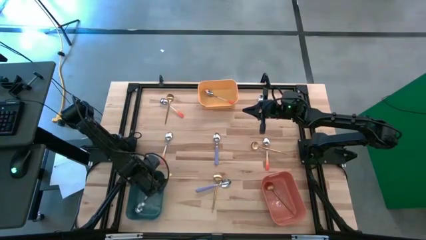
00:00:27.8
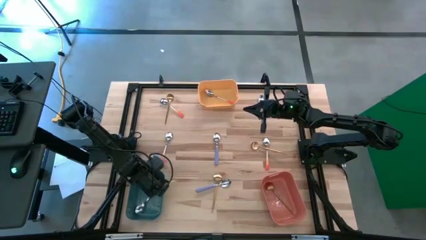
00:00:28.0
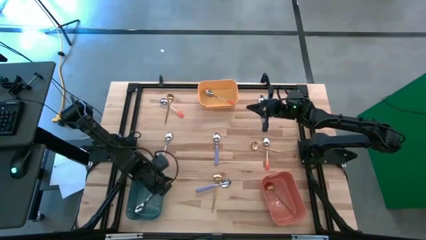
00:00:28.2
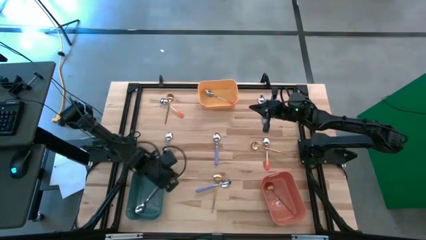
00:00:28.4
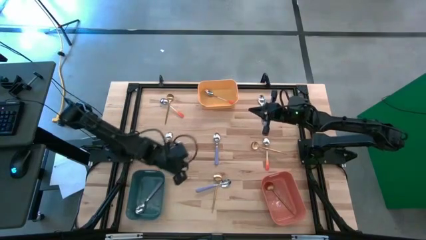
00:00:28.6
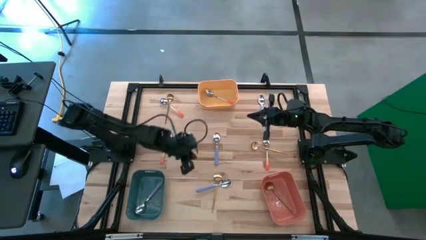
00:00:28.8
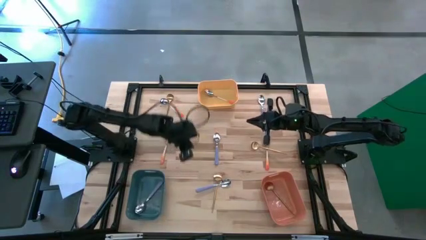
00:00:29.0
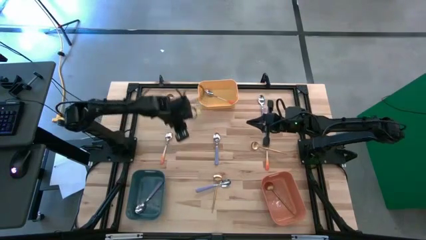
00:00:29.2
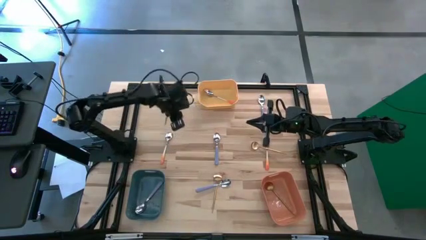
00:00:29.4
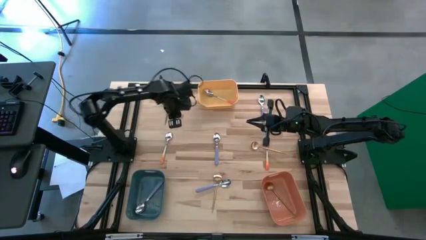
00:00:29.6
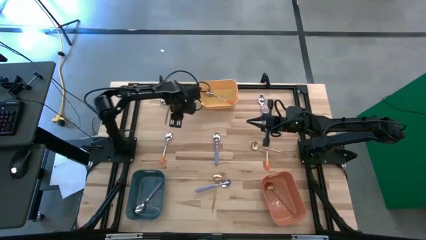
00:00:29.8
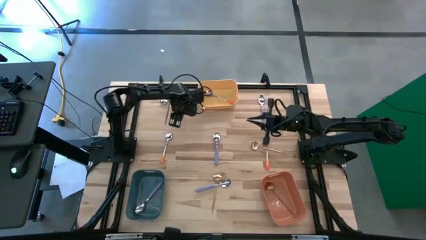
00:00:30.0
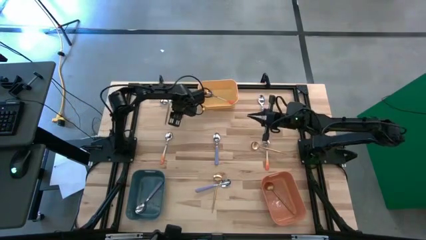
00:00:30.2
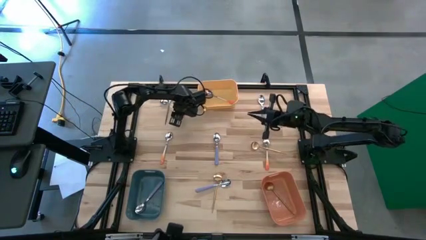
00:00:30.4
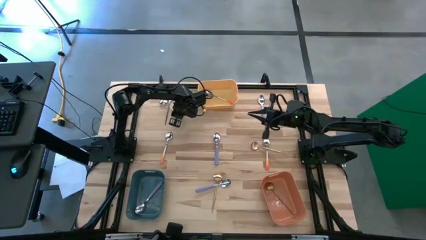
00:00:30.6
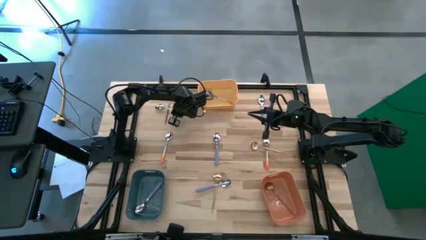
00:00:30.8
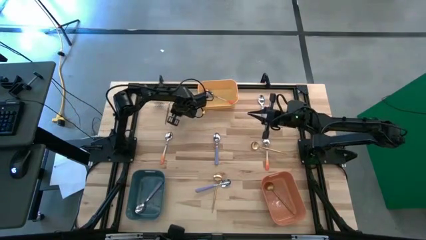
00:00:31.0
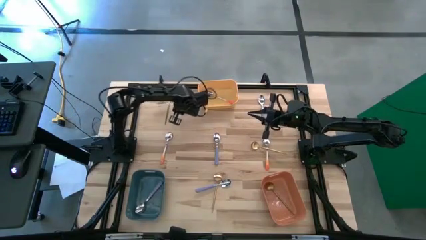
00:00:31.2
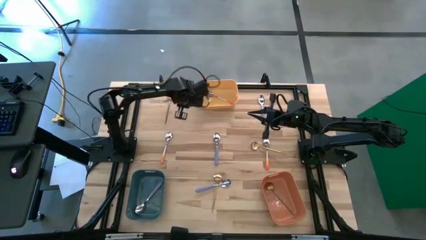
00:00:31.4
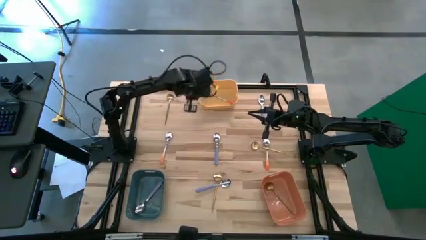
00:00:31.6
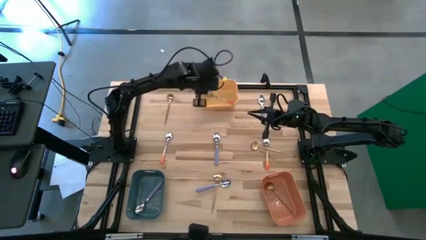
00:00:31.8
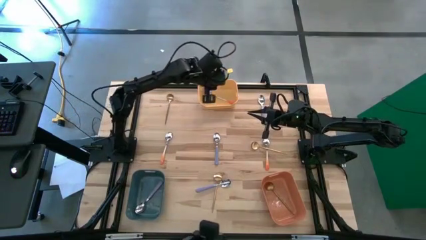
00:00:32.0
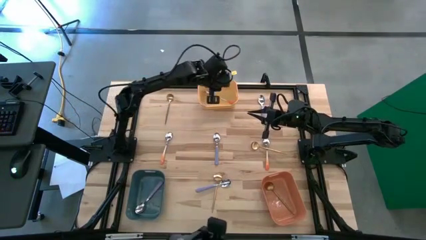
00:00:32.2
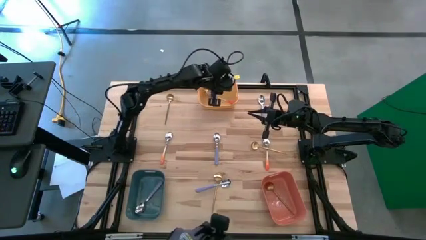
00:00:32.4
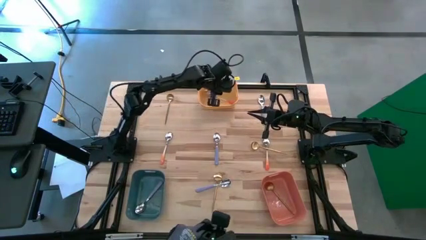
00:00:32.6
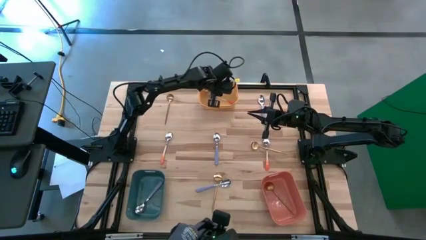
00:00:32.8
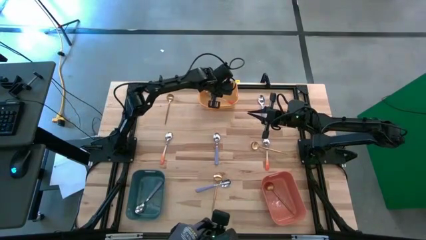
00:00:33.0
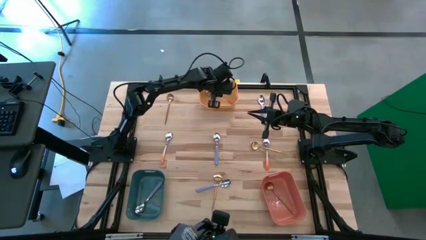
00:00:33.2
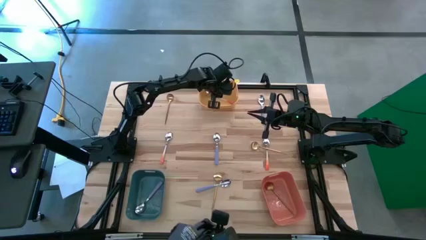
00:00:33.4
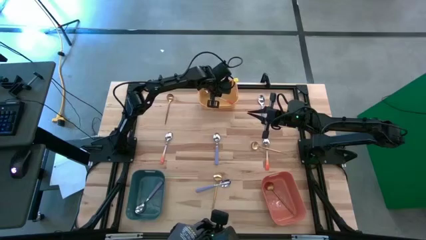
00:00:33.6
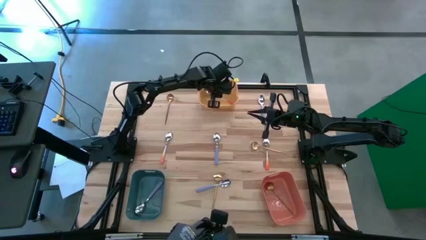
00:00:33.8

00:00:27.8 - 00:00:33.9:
Task: Sort silverware by color (type)
Put the top left orange spoon into the yellow bin

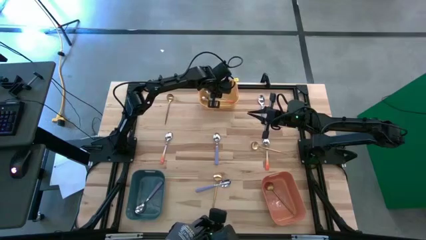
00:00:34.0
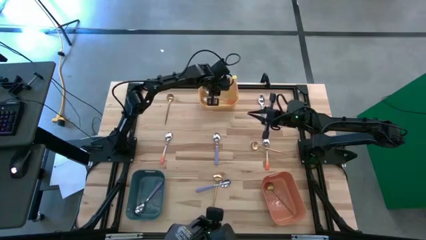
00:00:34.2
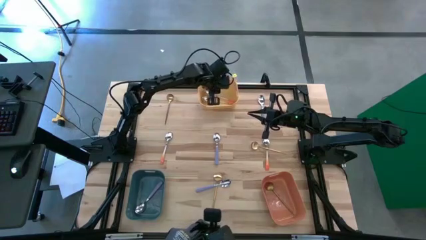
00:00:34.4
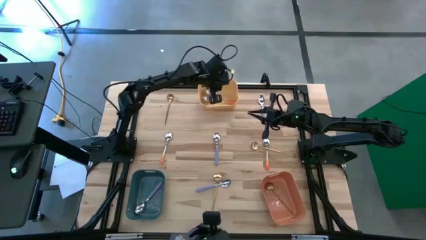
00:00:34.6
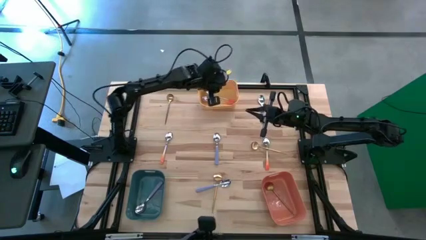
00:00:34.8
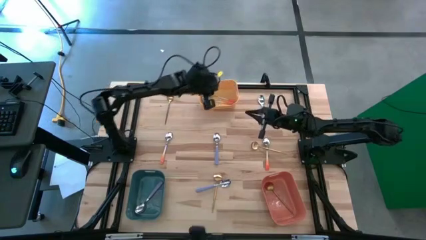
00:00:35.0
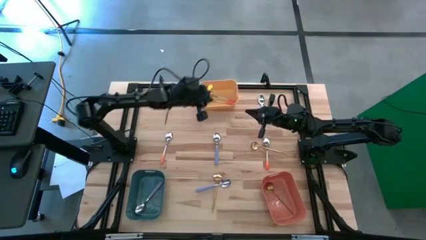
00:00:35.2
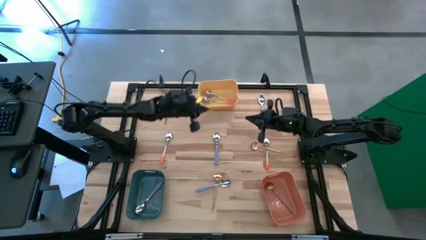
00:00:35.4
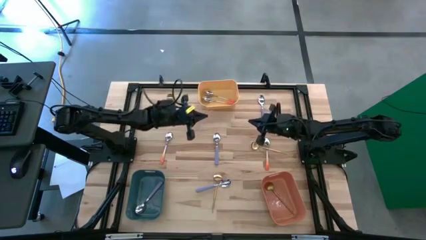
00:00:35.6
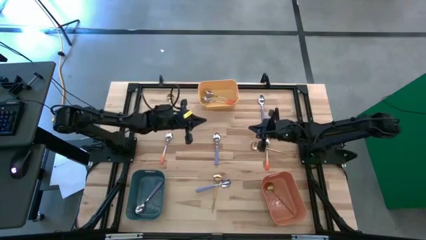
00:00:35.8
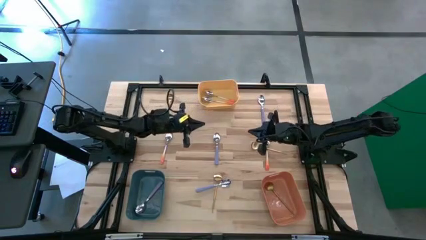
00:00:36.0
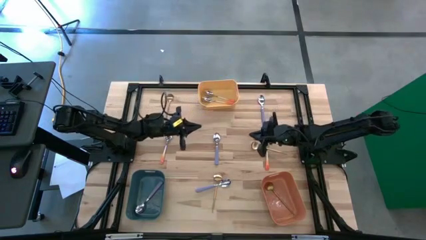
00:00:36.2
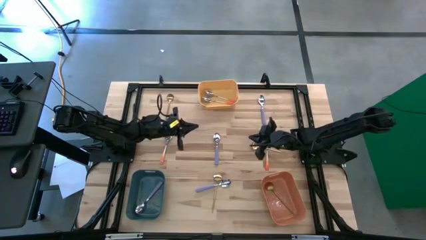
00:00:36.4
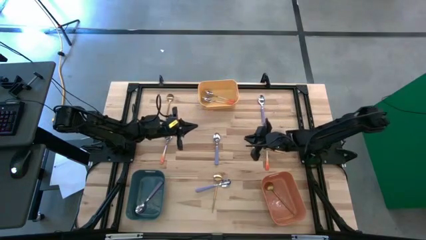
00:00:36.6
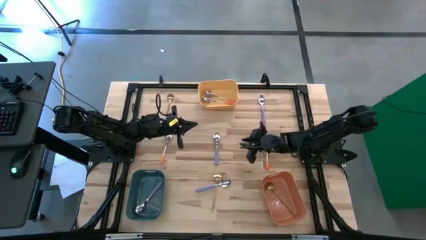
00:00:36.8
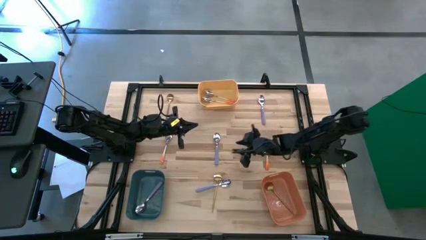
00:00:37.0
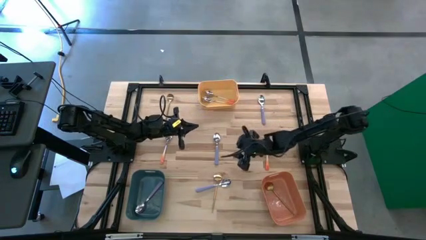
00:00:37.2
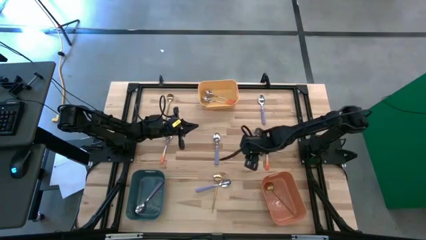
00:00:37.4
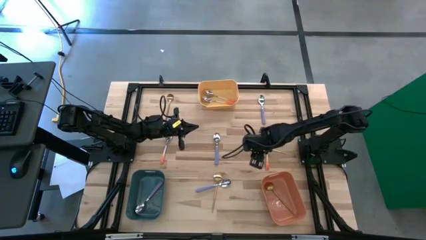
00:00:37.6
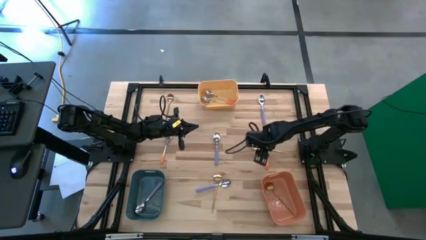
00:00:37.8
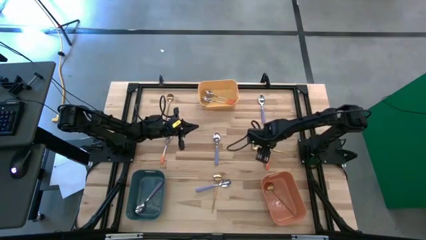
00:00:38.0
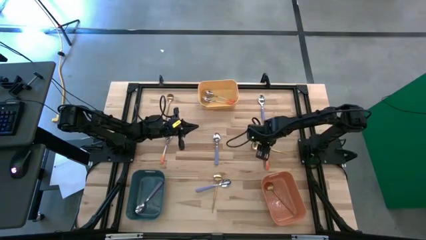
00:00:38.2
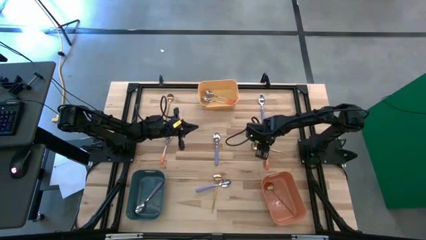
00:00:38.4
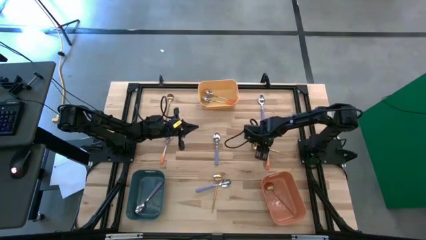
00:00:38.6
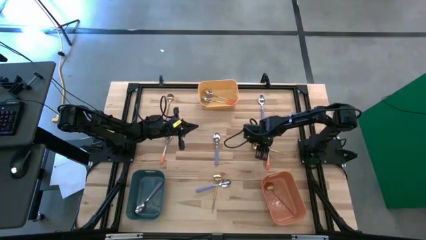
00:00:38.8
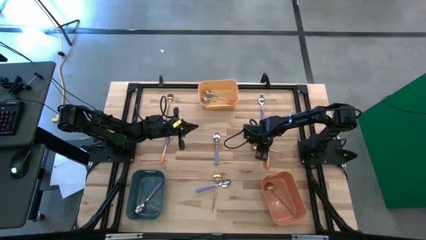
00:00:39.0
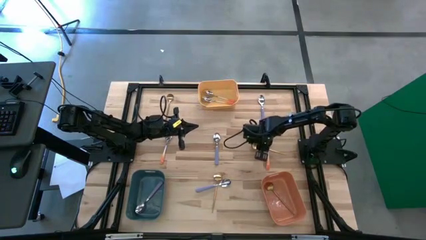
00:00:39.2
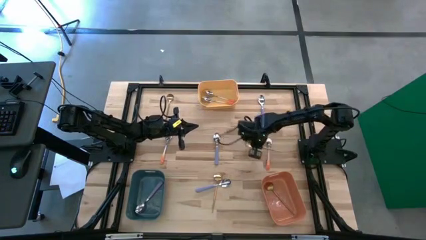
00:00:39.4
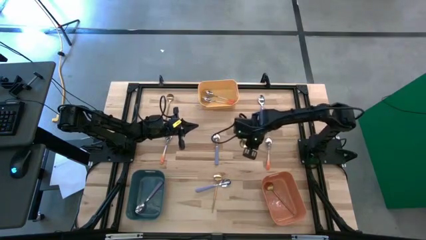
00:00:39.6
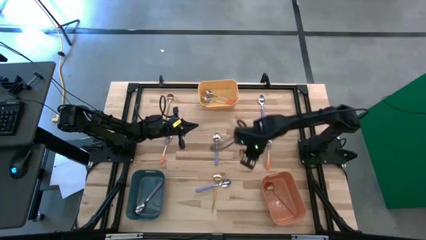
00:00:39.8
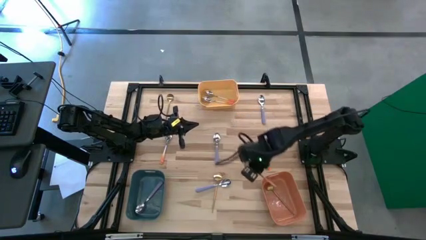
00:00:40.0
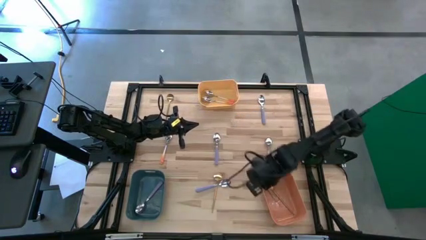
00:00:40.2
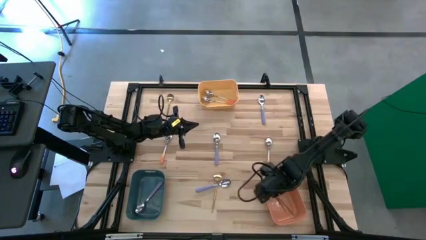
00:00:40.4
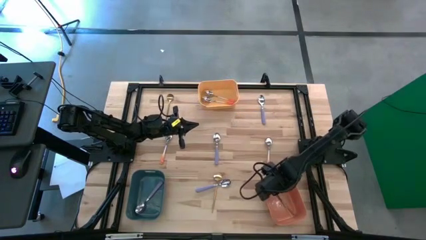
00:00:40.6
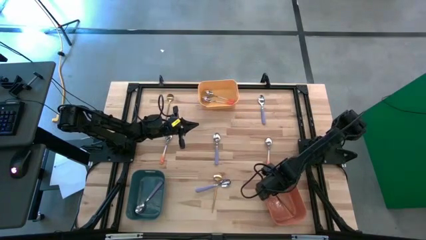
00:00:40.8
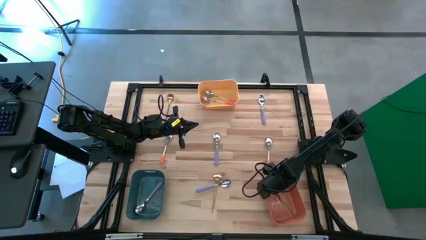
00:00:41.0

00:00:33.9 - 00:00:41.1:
Put the top right golden spoon into the orange bin

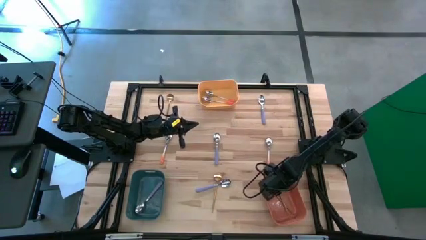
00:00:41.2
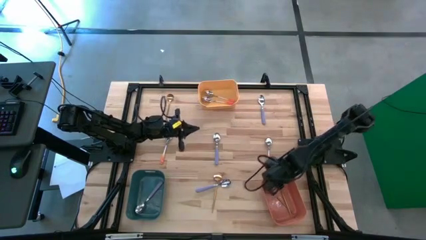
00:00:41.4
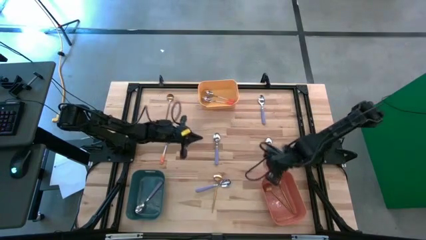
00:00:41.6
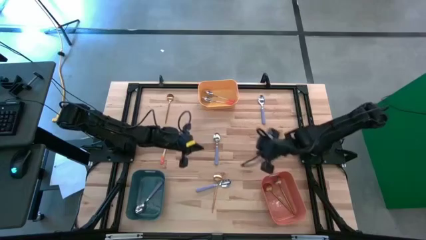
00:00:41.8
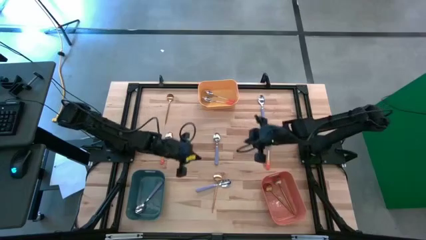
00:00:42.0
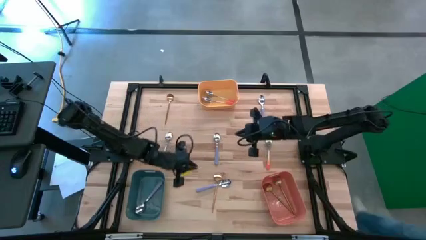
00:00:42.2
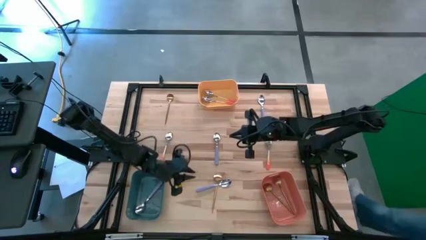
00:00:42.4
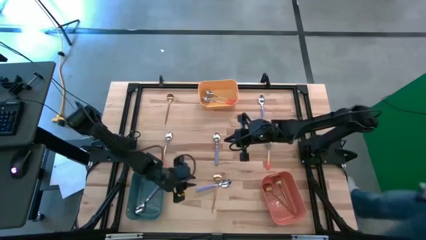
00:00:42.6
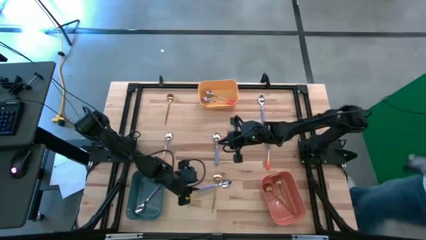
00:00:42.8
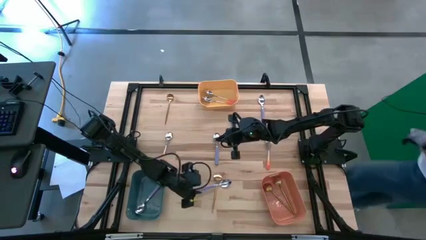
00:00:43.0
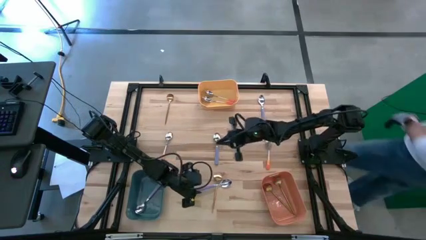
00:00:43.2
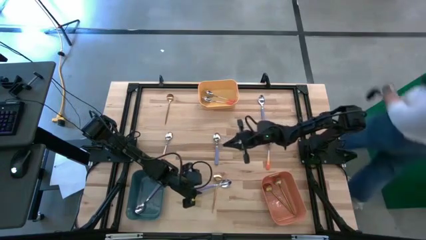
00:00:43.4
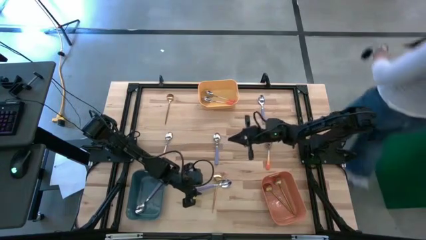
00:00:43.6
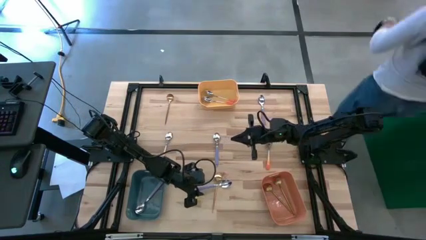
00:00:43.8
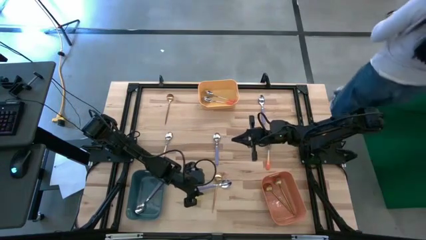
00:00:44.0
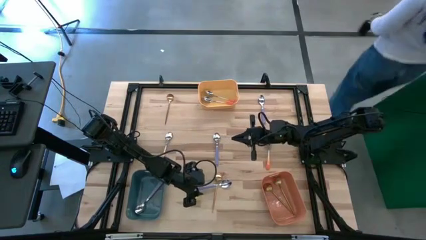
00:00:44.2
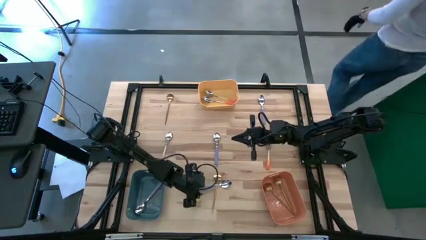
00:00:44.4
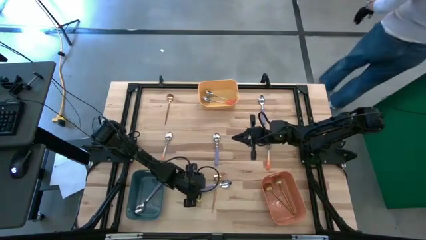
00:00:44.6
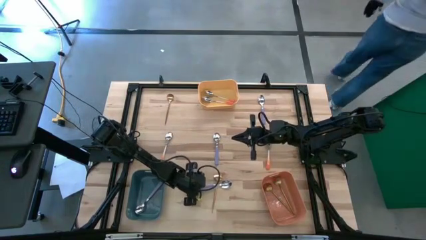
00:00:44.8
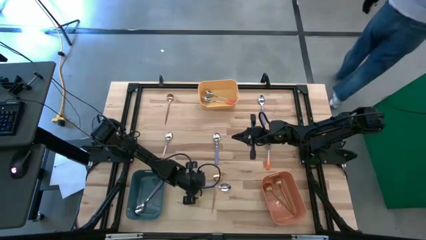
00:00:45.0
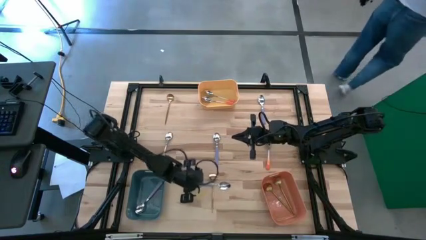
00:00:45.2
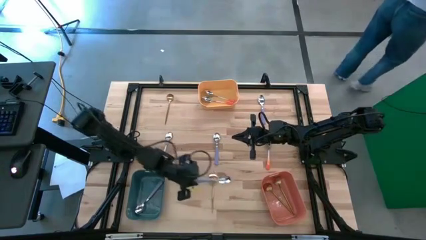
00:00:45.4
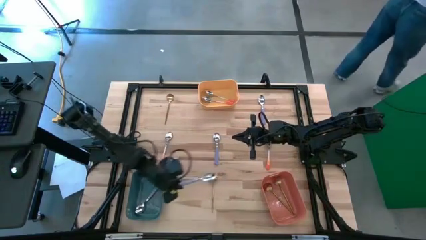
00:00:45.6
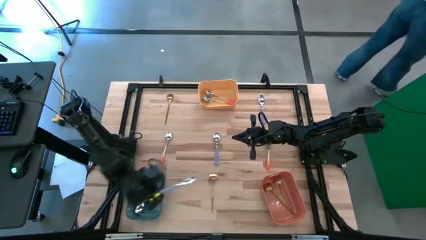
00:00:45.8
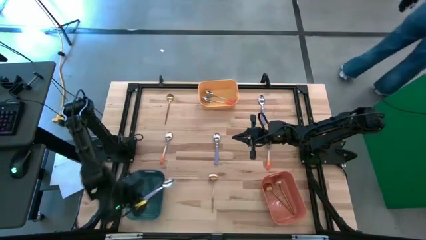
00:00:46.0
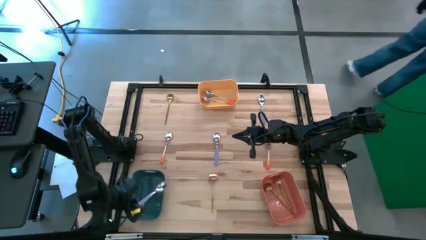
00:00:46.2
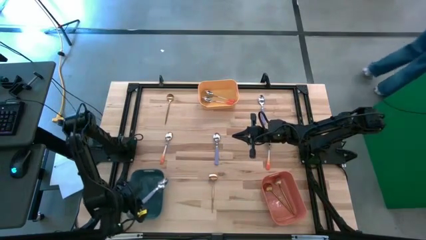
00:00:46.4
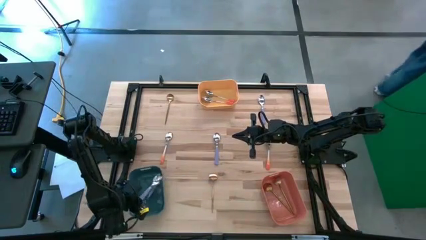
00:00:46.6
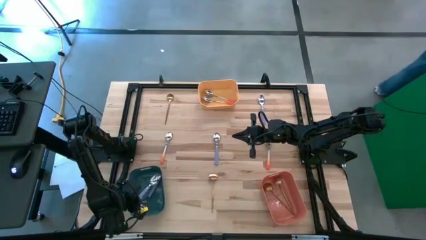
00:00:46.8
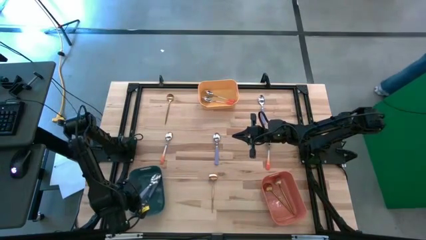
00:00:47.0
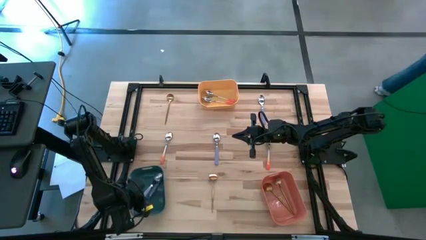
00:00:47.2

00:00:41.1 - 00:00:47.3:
Put the bottom left blue spoon into the blue bin
